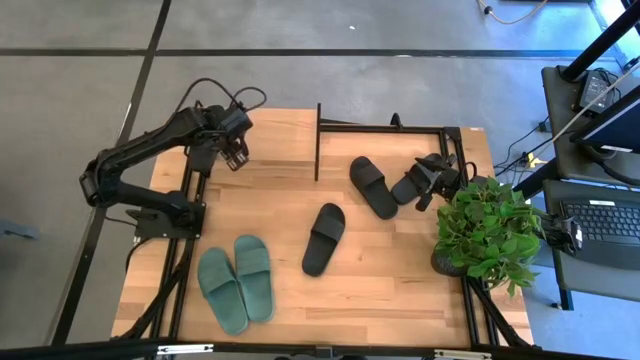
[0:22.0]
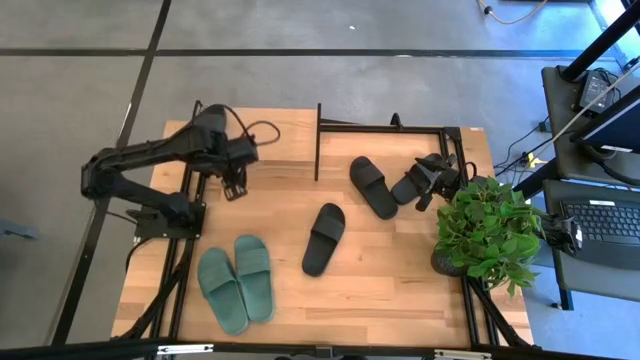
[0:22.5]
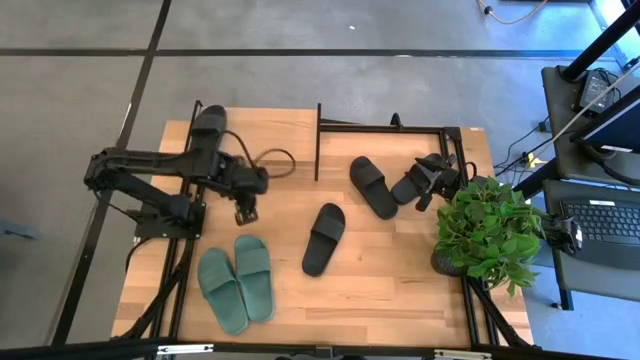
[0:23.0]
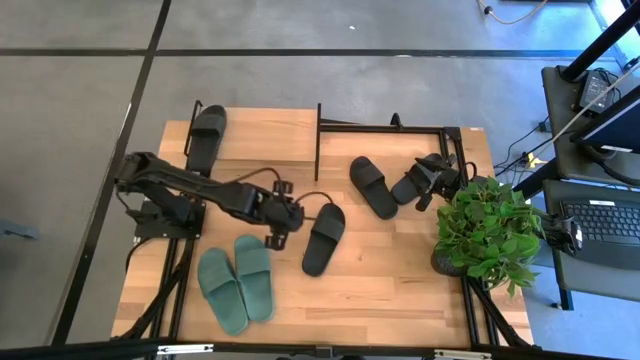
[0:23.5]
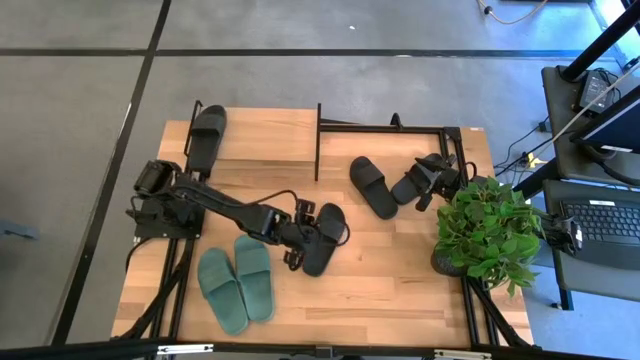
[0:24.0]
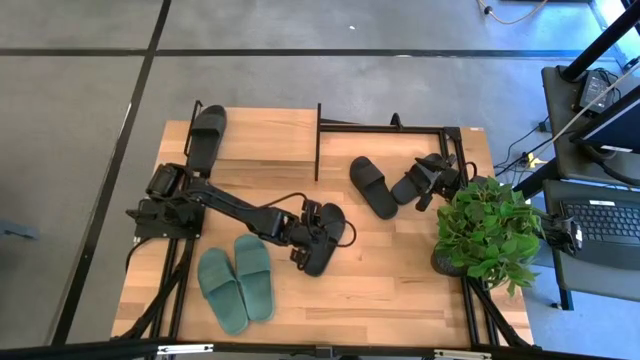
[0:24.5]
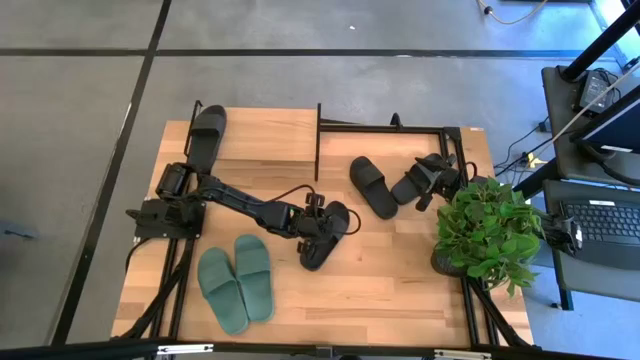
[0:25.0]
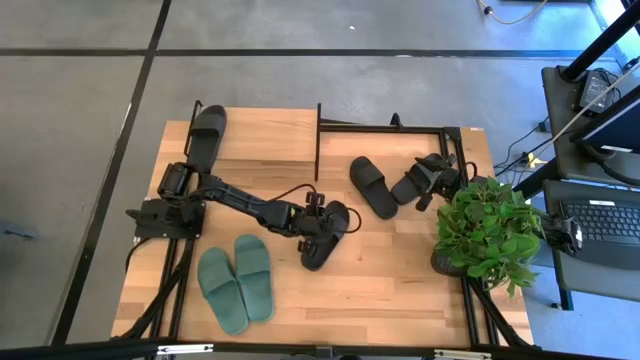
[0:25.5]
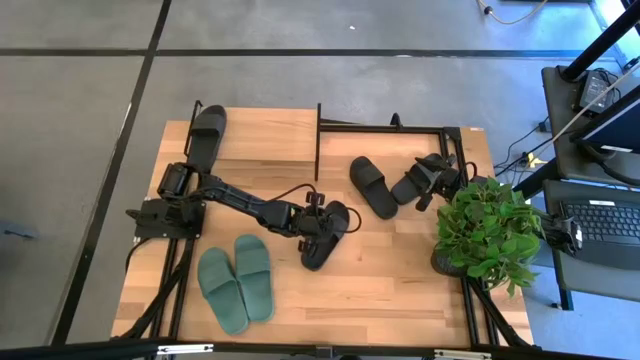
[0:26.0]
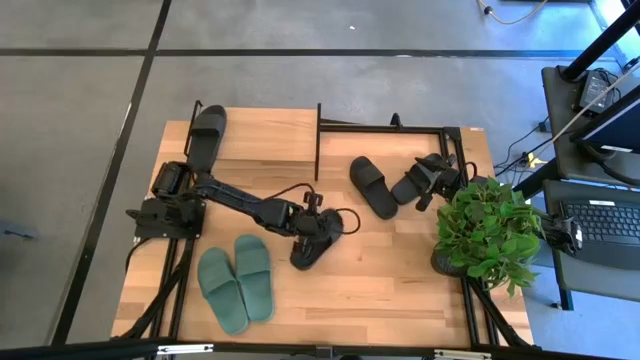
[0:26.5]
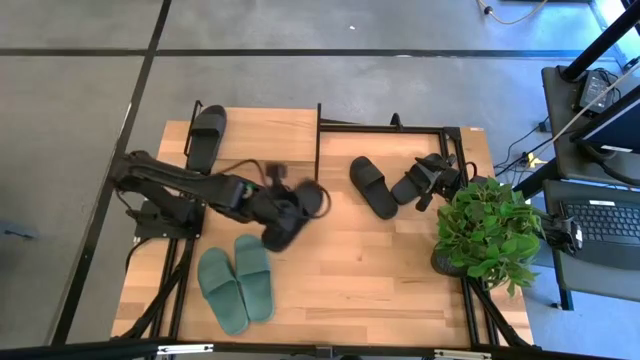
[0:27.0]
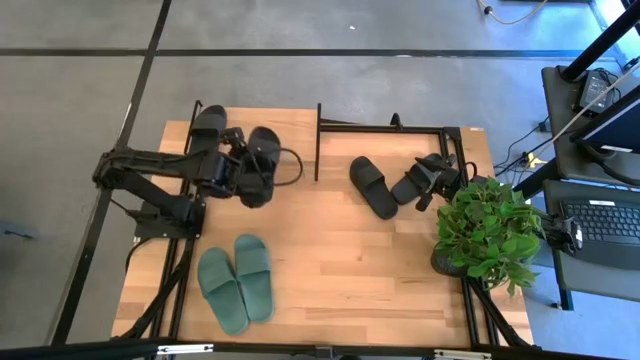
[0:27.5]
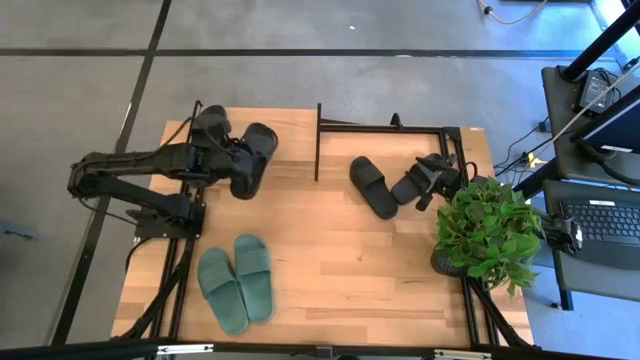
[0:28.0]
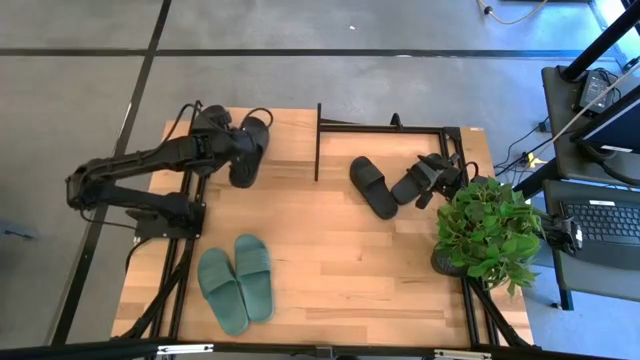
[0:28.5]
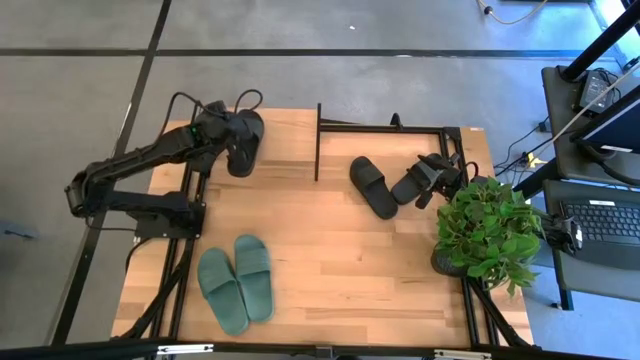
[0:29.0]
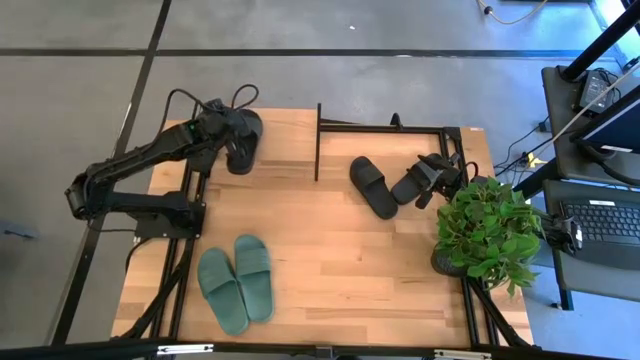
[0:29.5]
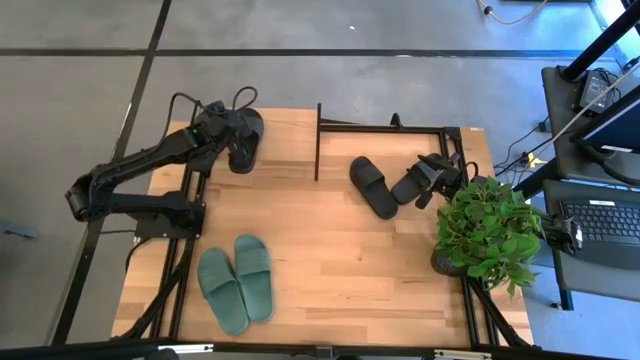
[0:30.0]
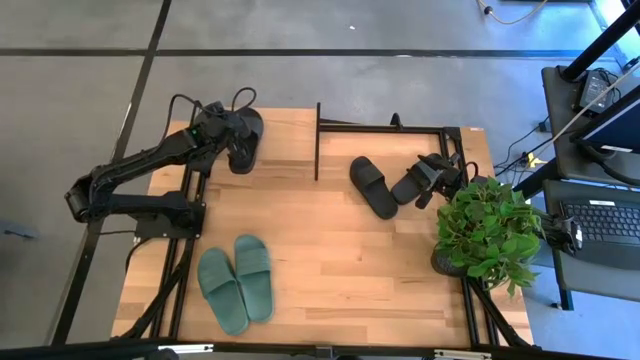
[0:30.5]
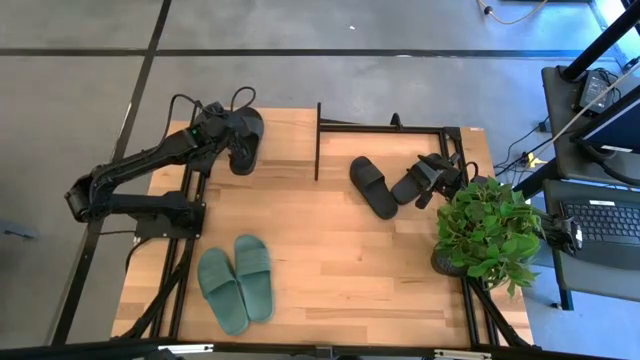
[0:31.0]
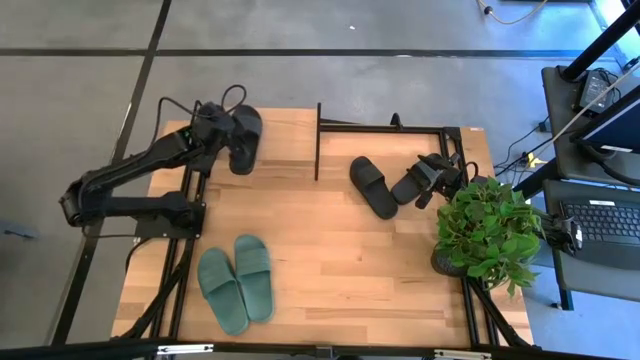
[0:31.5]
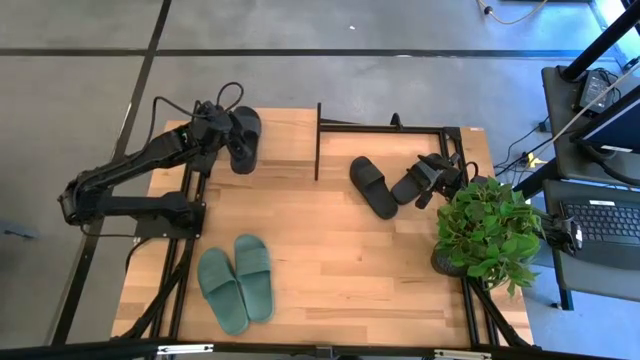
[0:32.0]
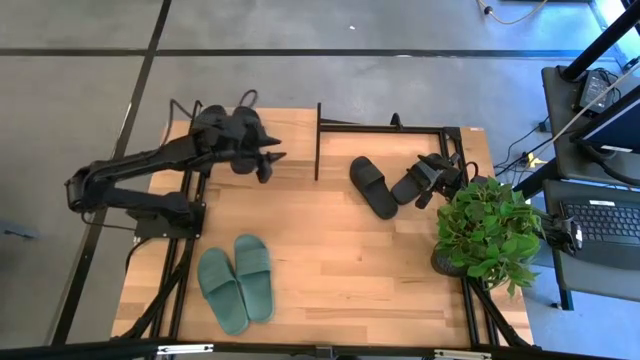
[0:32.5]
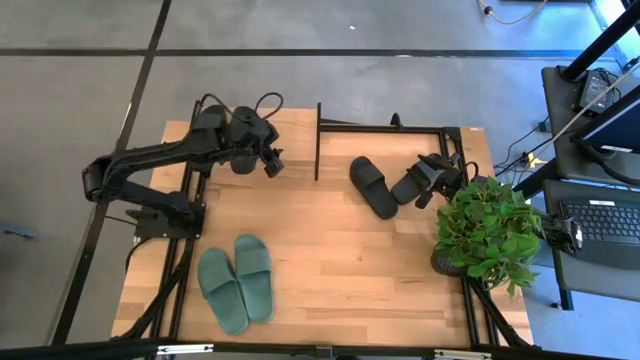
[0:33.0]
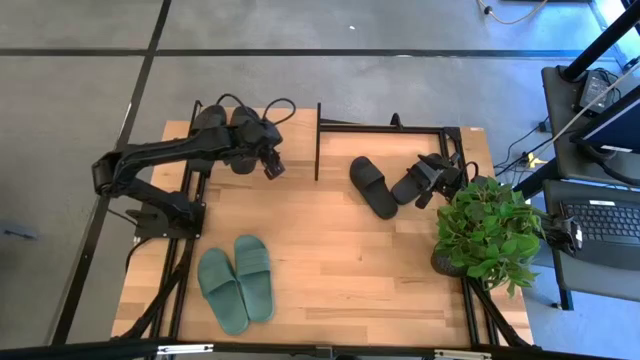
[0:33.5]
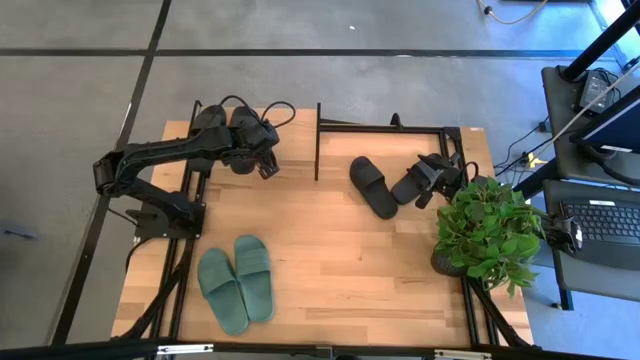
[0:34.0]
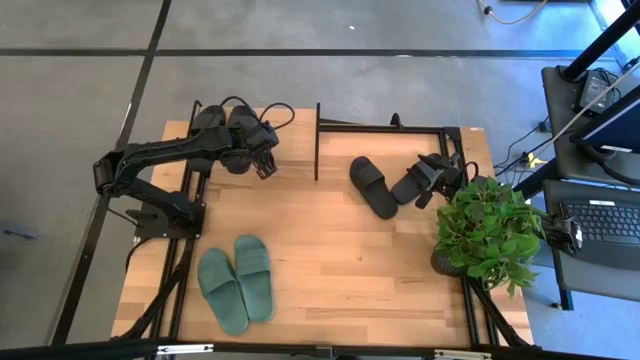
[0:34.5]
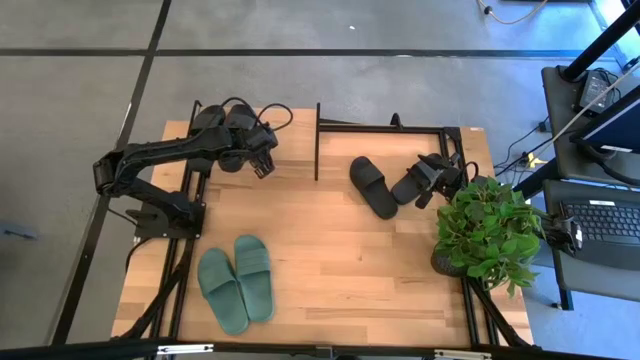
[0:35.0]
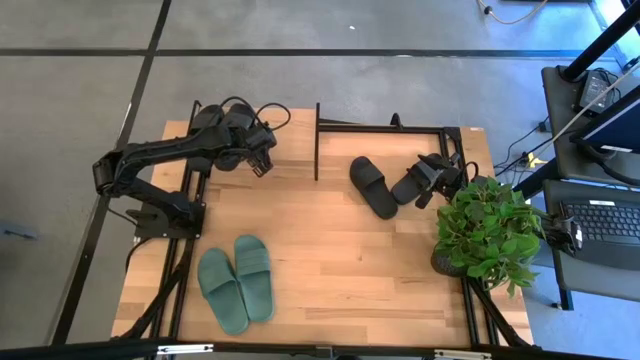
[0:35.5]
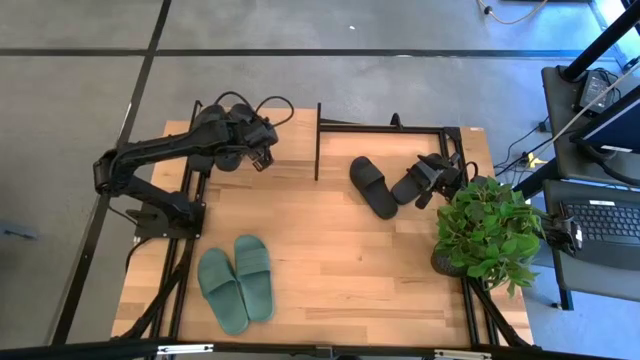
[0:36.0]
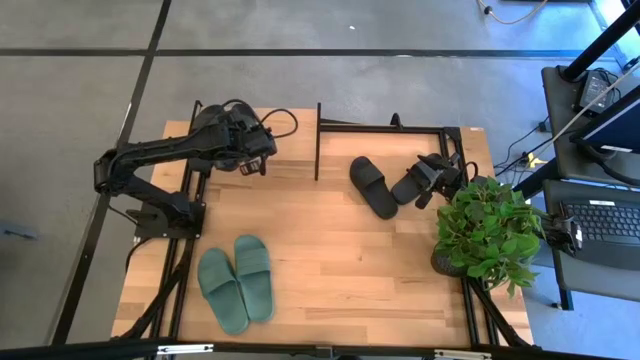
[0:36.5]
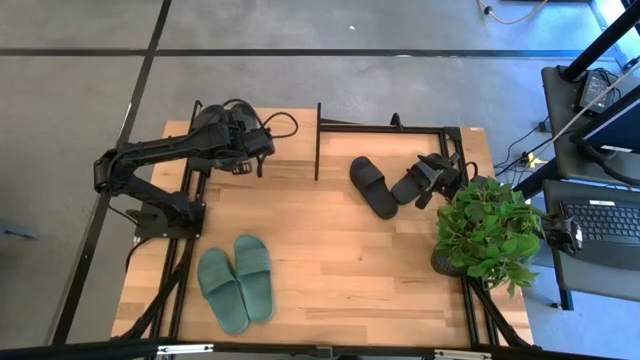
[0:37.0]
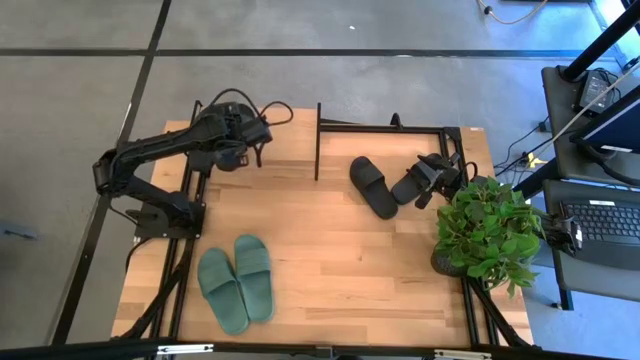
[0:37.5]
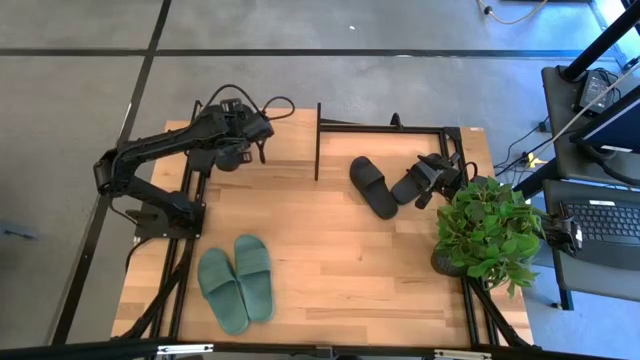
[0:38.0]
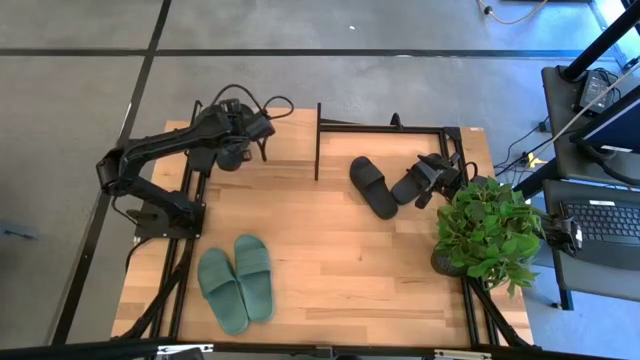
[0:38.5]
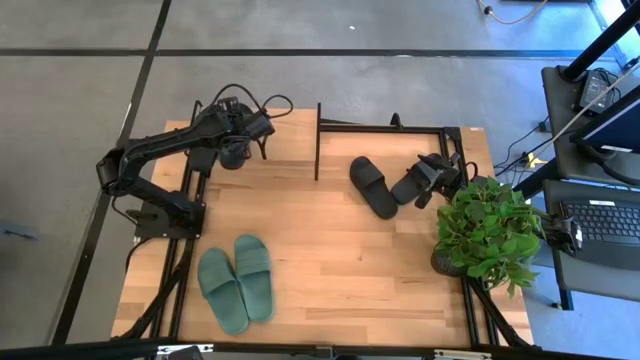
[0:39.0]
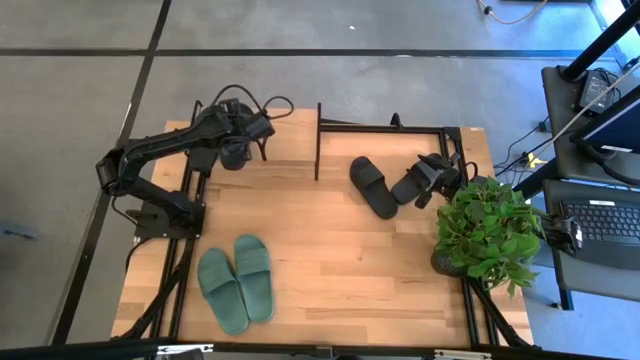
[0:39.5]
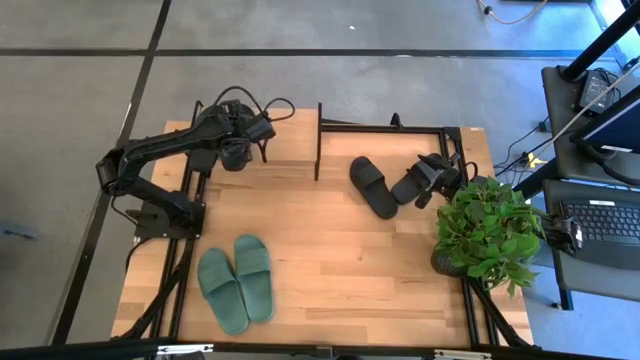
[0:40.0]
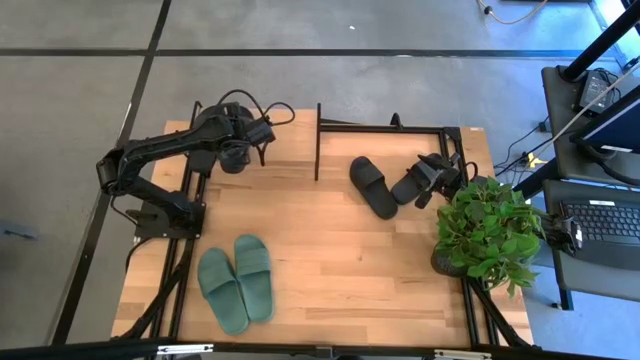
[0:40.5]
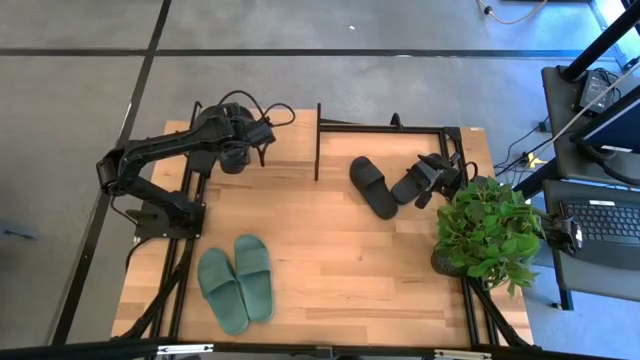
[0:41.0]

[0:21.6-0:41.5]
Task: Pick and place slides into the shelf
Put the black slipper on the shelf

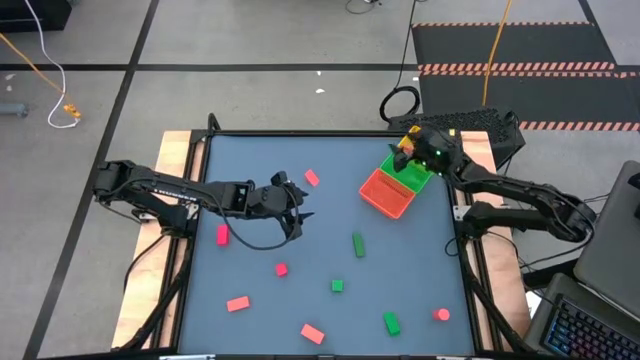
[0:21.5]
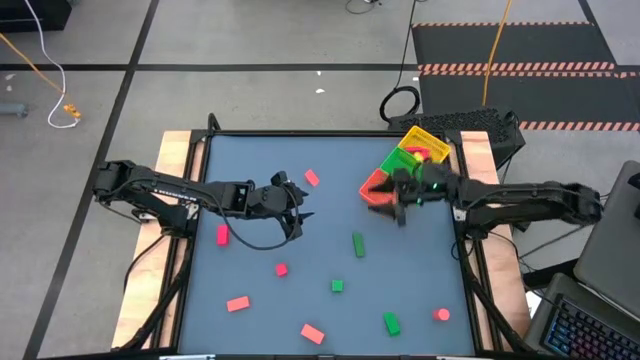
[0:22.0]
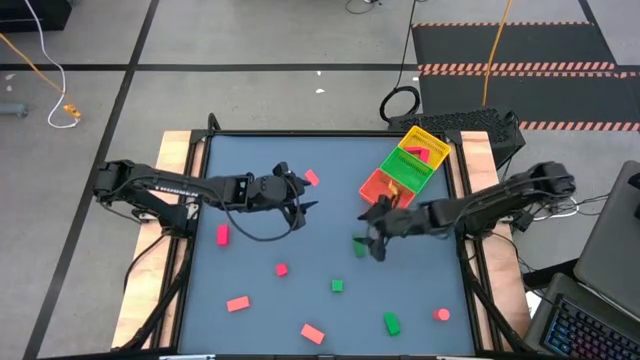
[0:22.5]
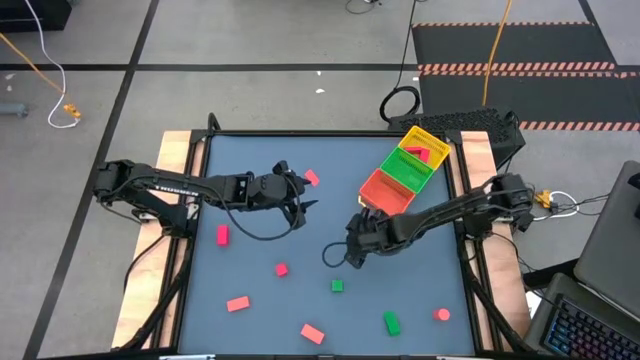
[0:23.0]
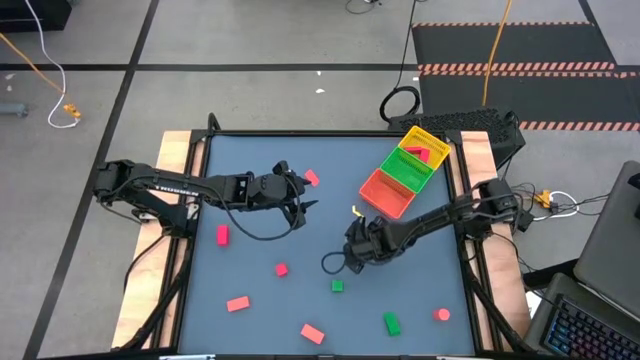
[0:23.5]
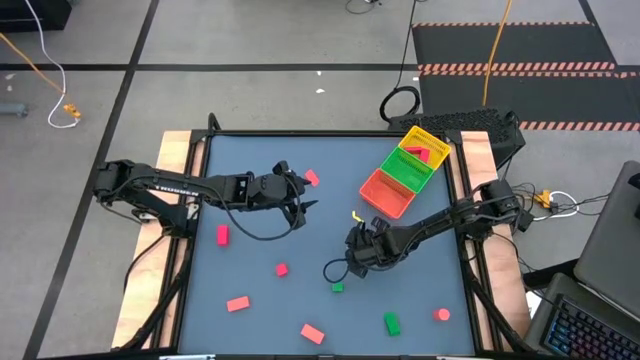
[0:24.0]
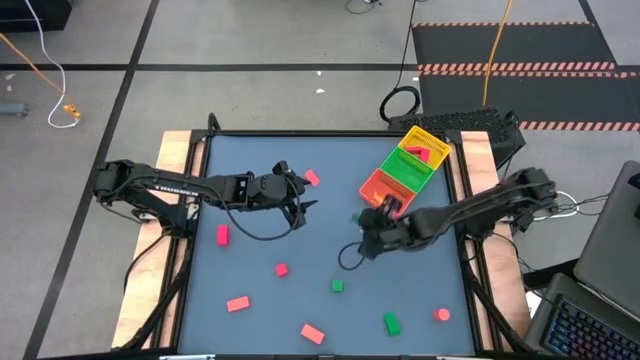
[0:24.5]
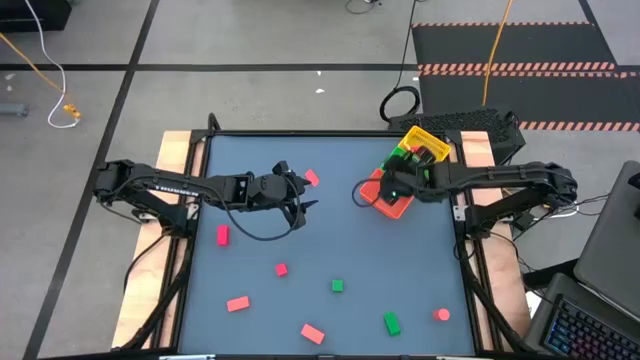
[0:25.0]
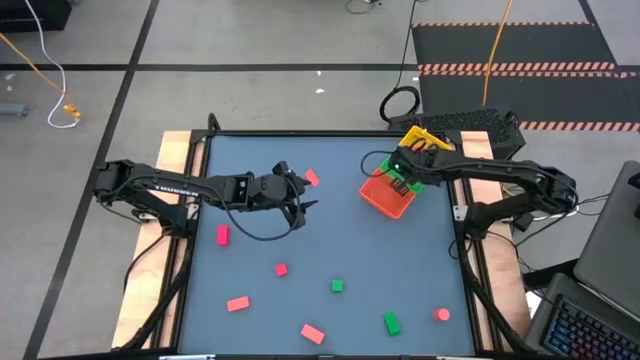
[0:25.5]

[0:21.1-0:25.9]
Task: Sort & place blocks by color
Put the green block into the green bin
